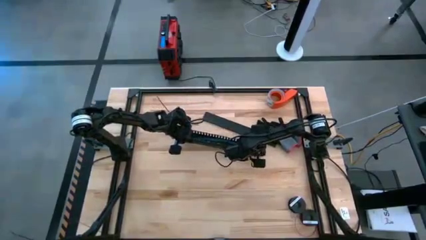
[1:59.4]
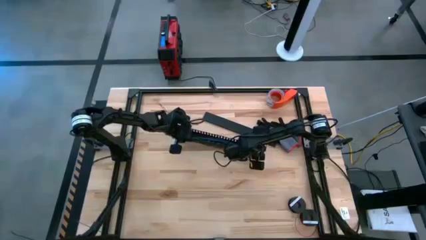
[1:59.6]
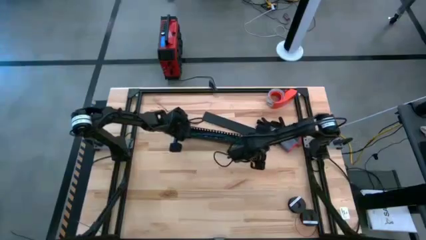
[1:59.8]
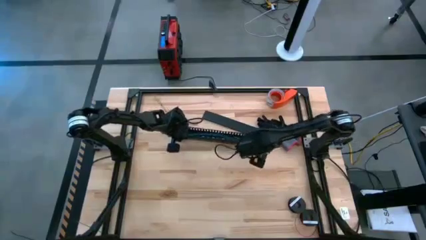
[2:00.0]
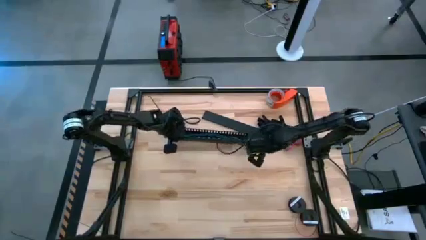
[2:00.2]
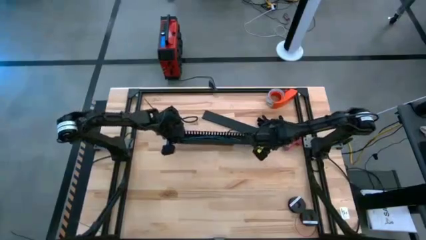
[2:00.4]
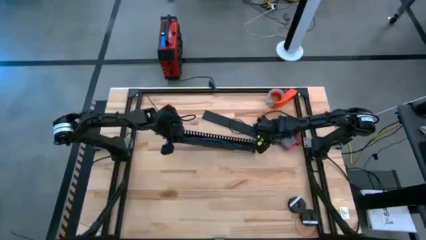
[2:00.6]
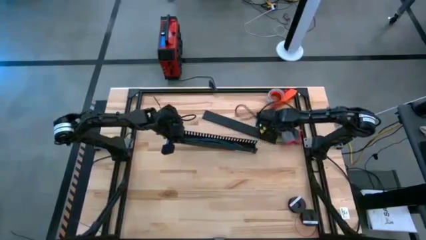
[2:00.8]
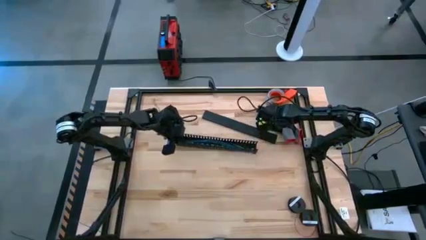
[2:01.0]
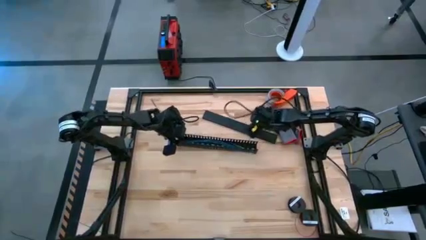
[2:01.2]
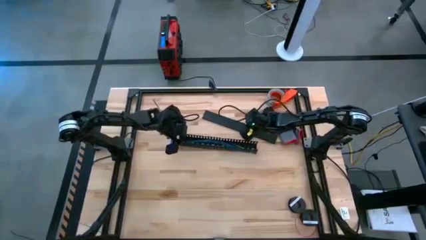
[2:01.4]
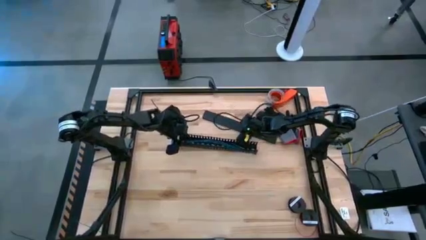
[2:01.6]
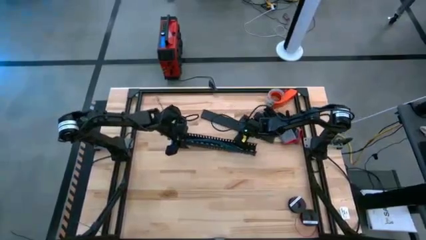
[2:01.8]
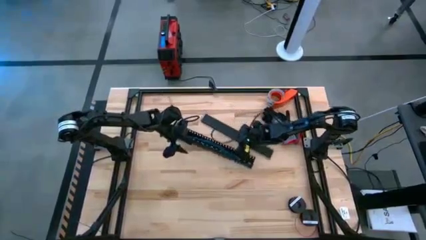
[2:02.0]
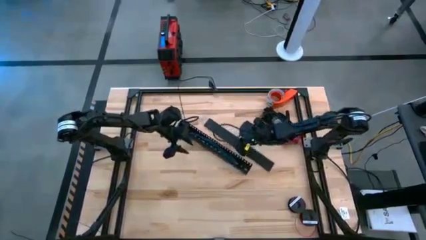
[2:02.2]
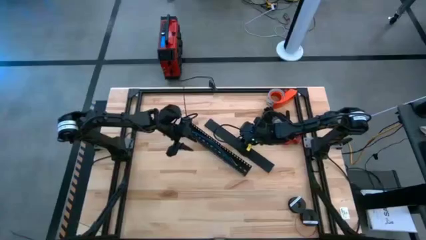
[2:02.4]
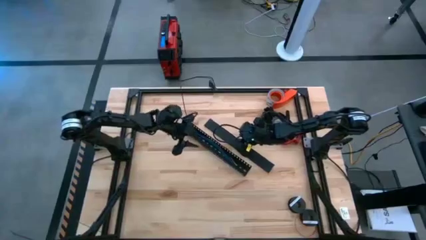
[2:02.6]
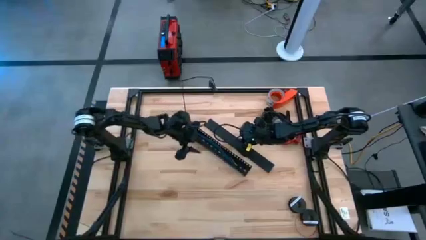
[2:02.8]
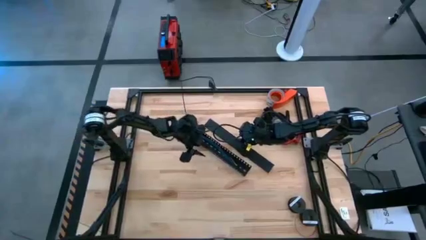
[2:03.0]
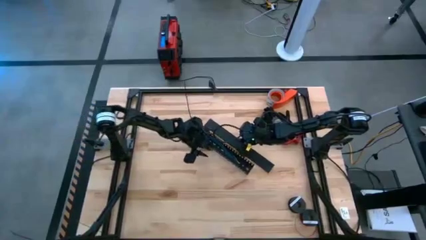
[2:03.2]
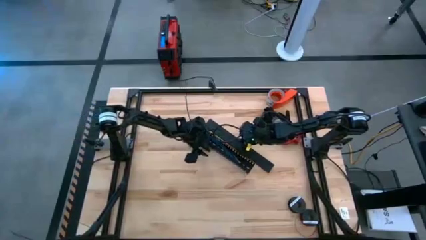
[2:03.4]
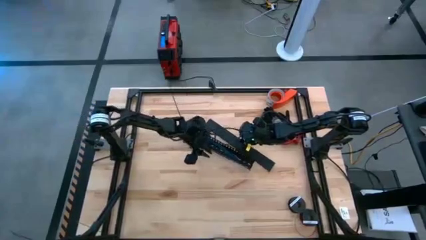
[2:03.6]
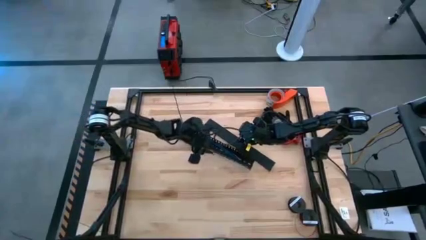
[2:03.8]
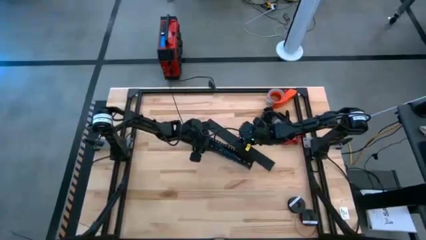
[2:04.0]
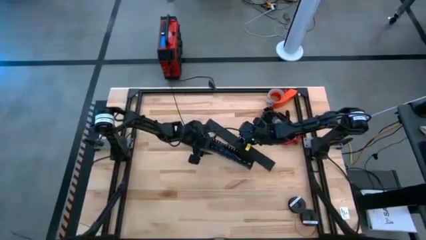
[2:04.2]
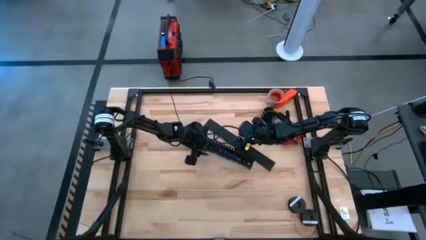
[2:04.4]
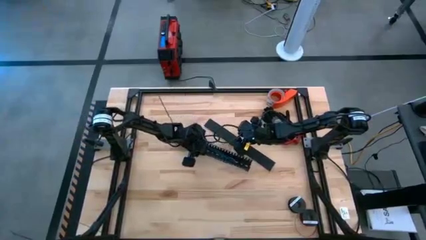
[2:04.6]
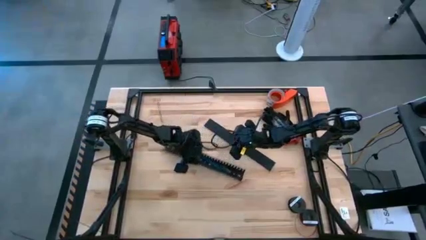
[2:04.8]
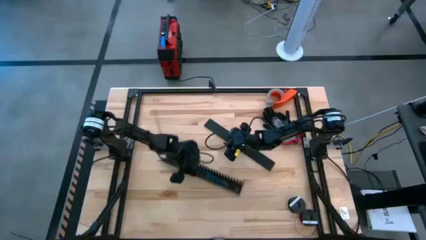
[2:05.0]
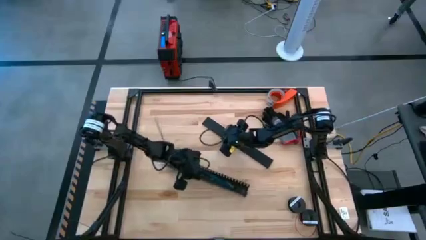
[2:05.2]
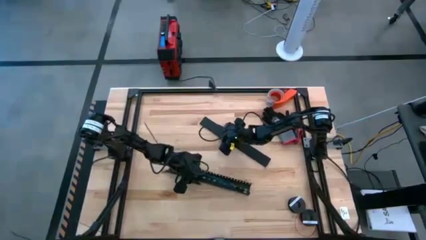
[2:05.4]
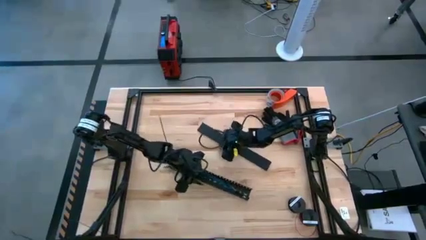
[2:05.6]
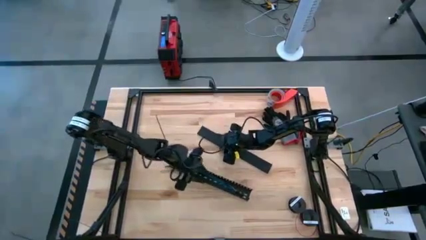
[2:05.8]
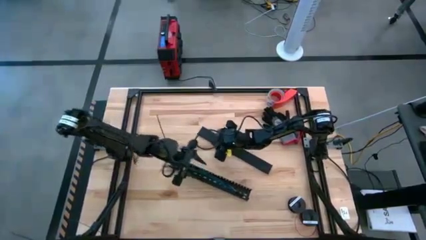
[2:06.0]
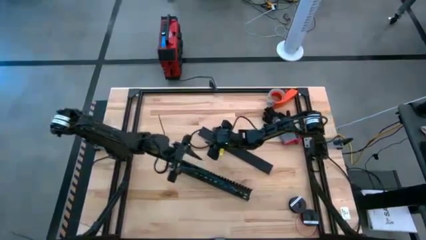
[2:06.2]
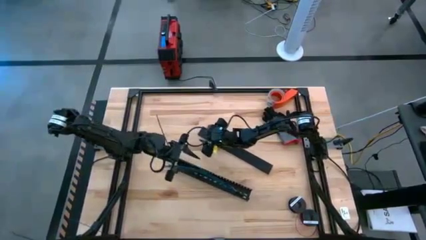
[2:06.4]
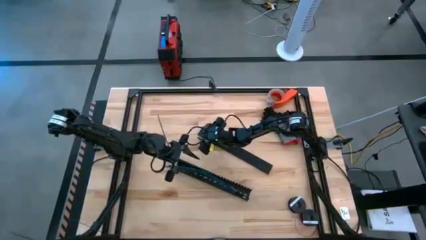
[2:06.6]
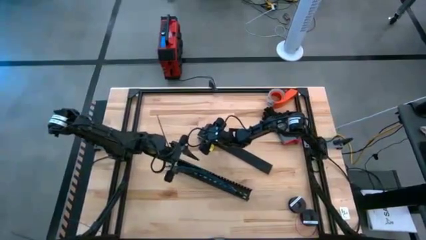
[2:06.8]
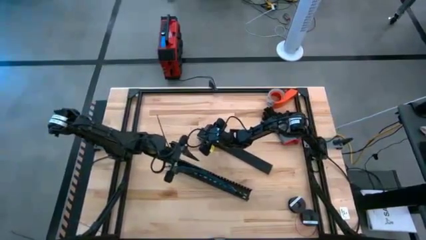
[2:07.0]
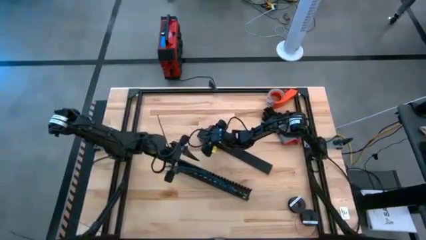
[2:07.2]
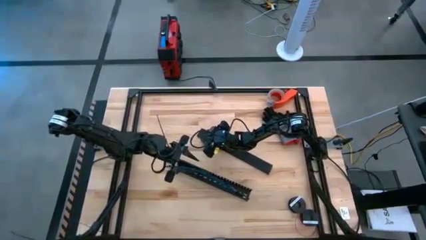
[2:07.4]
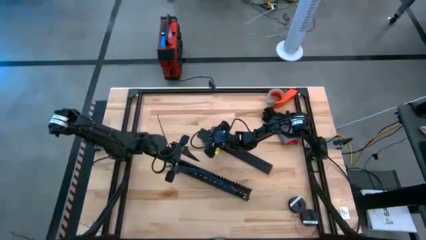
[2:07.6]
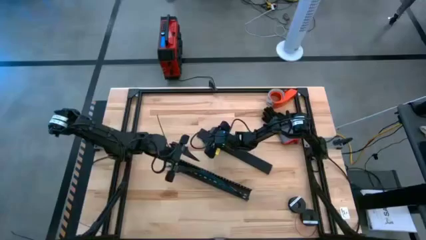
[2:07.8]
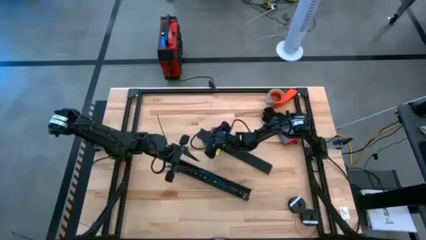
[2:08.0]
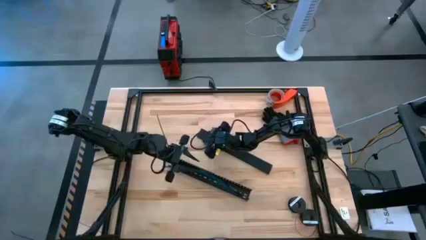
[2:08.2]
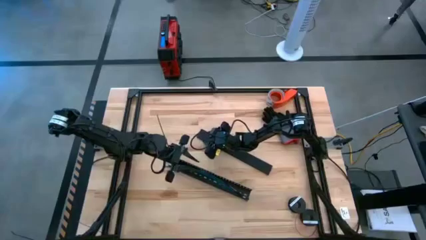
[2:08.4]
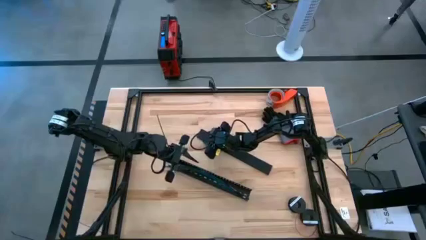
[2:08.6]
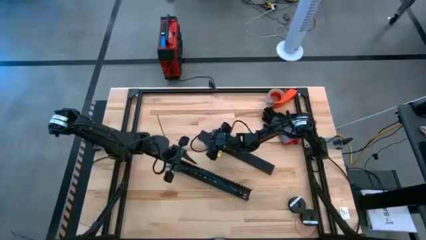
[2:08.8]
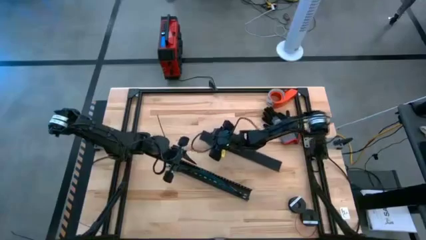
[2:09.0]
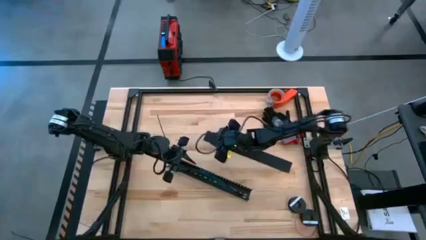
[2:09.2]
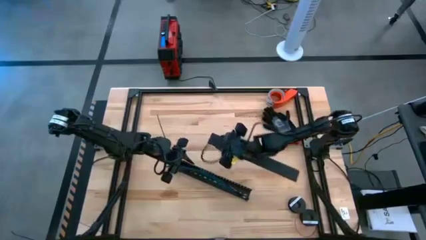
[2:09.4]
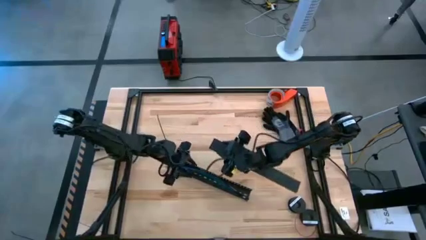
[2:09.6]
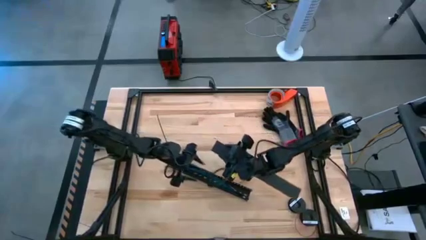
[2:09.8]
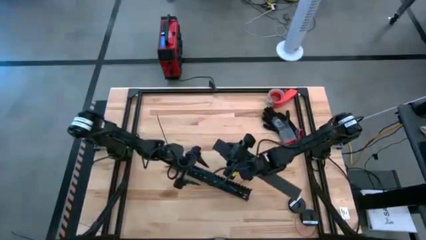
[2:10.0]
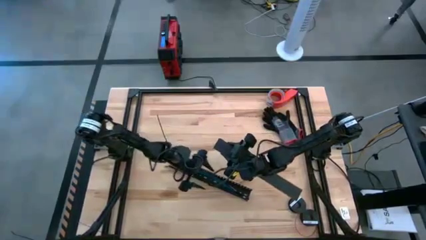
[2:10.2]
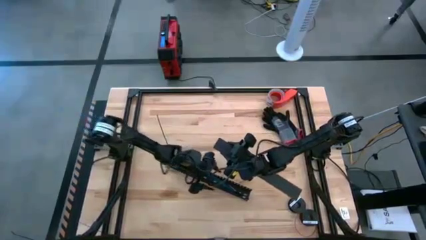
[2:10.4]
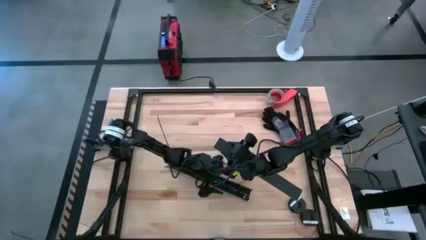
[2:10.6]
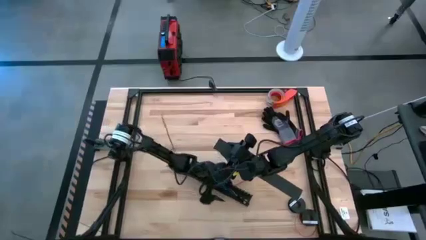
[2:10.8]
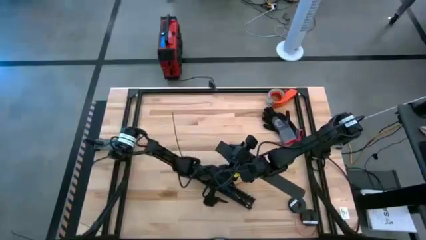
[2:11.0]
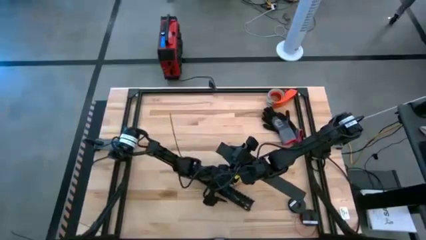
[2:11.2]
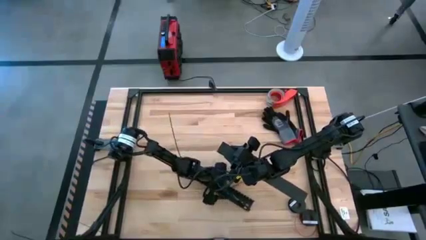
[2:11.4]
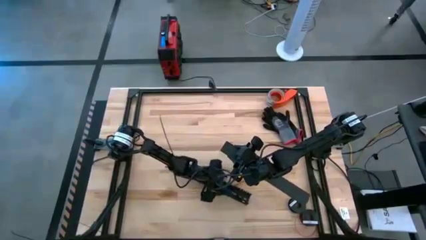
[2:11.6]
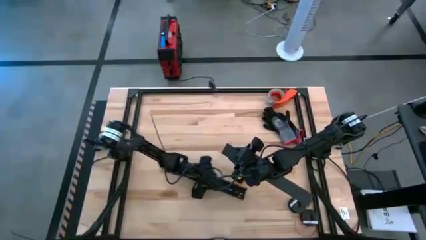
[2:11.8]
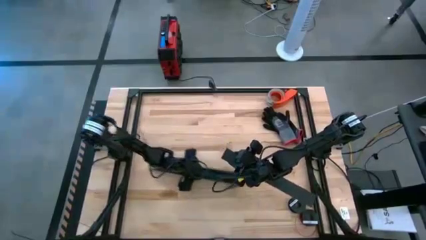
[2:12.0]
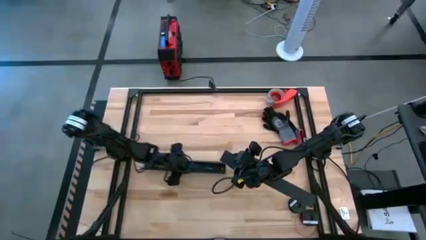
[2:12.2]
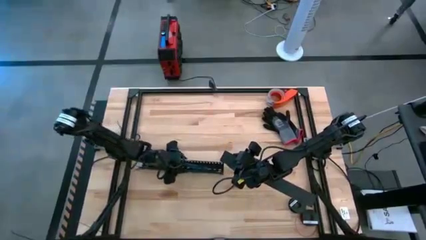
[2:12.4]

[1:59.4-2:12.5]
Task: Ziptie cables
Close the black cable duct

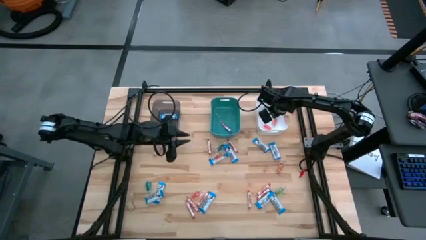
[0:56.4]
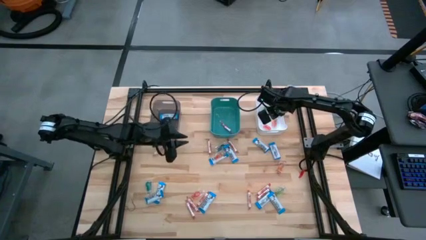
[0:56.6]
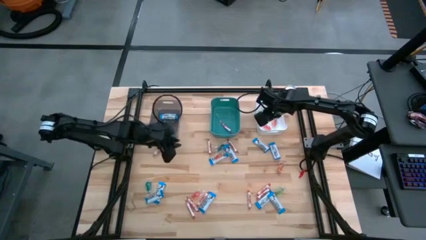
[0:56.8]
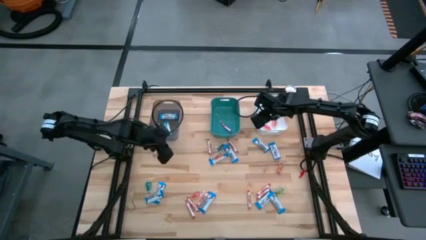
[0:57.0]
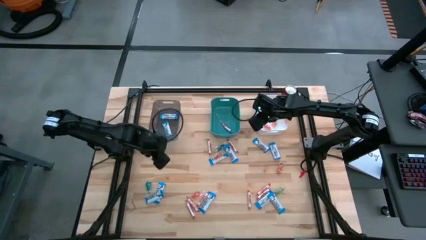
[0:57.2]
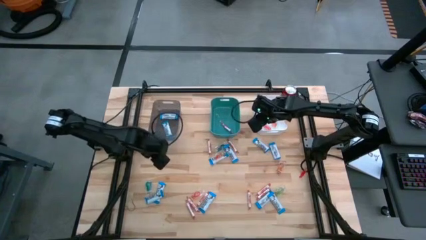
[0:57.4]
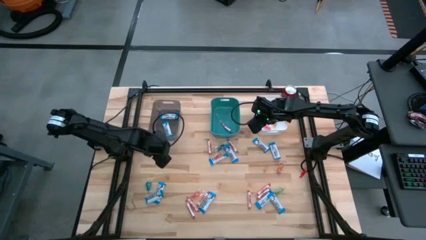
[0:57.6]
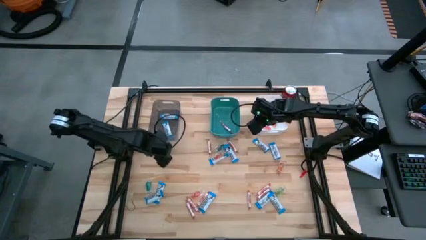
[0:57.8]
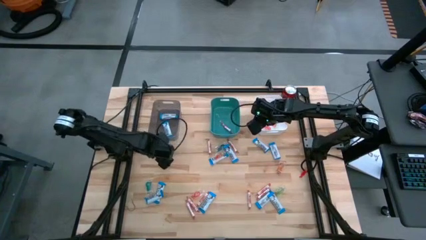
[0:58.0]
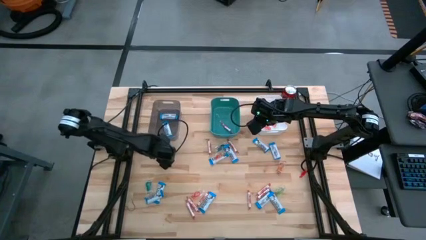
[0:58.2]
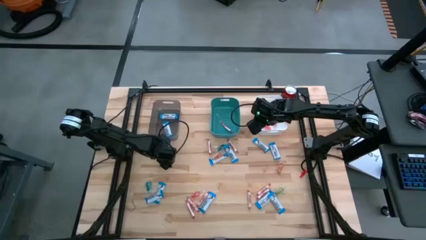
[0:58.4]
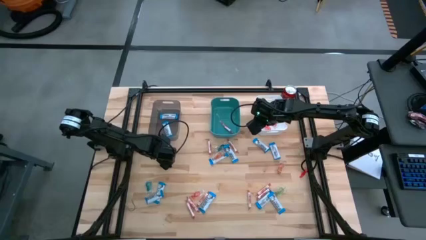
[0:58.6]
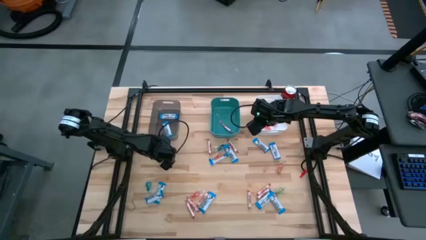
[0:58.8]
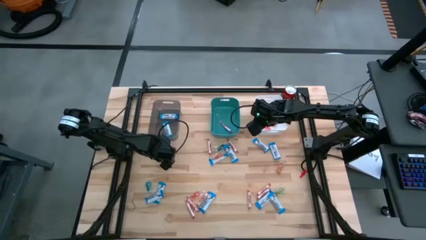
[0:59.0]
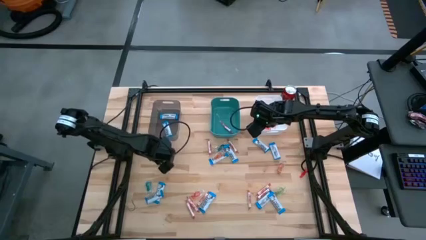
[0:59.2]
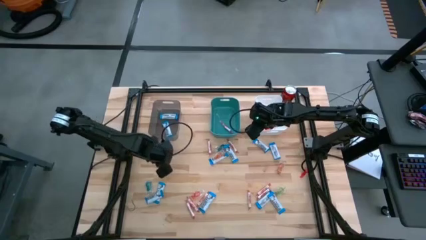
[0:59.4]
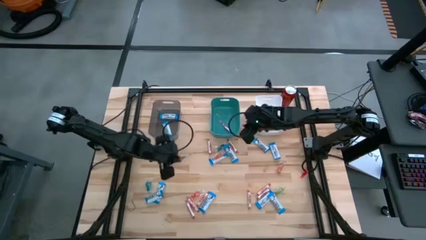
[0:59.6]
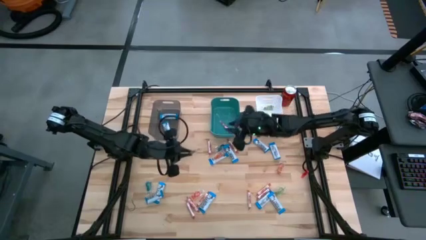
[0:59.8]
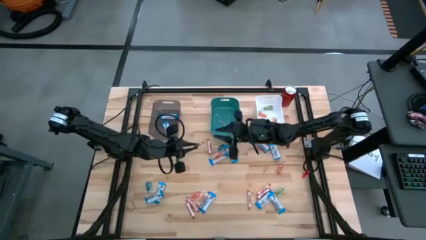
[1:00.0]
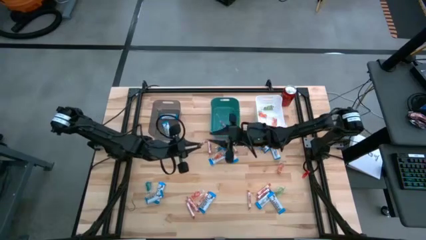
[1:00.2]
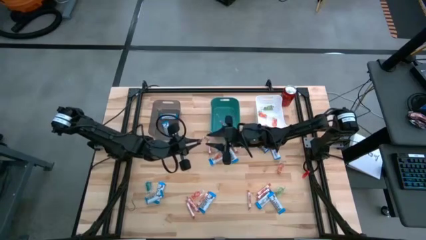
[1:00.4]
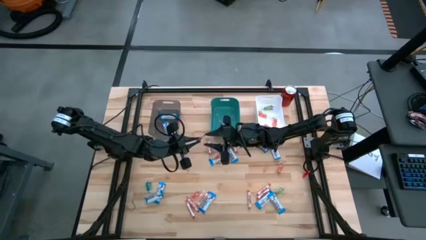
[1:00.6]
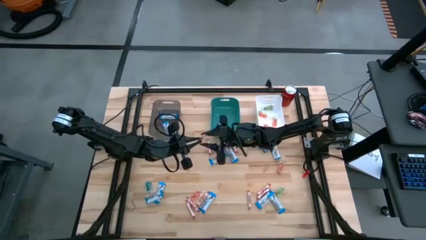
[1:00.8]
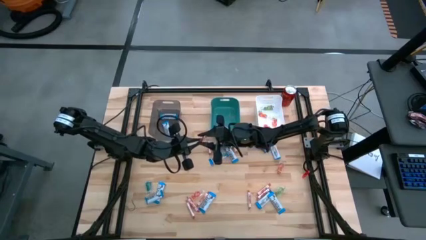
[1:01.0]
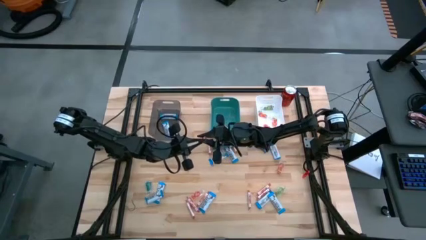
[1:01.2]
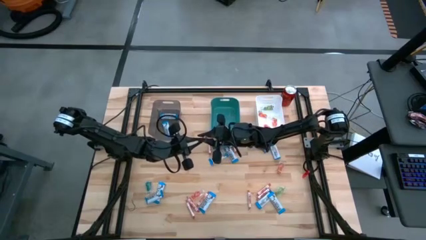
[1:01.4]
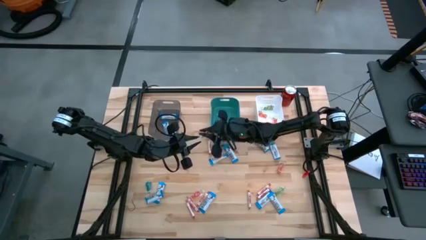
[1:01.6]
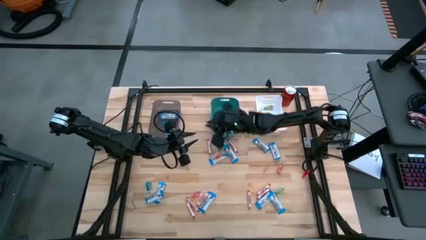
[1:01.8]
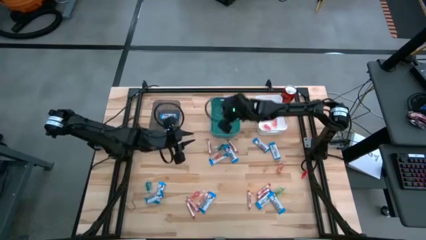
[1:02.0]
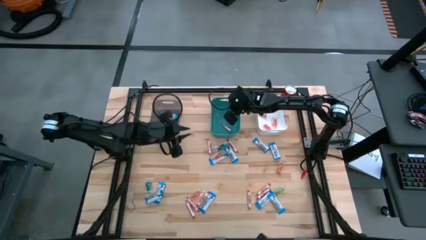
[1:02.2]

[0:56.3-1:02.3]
Task: Sort candy
Put the red candy into the blue bin
